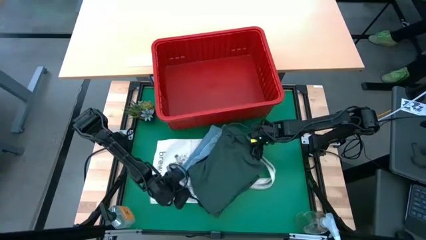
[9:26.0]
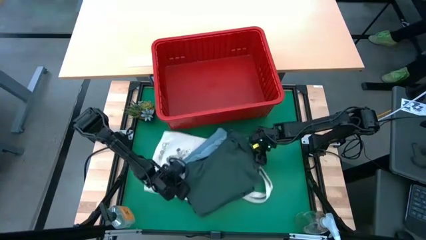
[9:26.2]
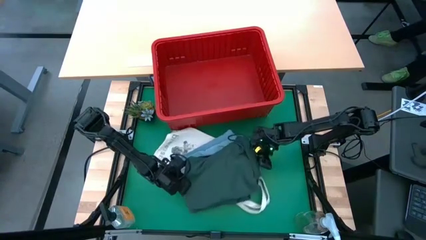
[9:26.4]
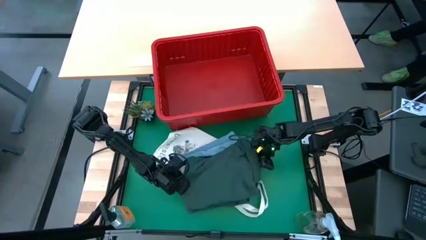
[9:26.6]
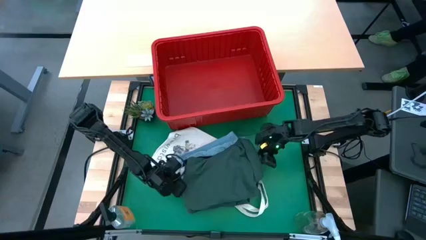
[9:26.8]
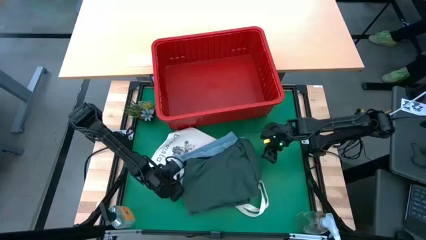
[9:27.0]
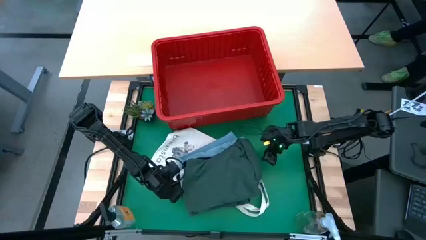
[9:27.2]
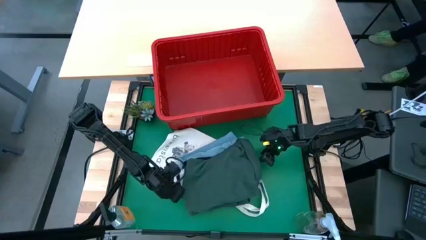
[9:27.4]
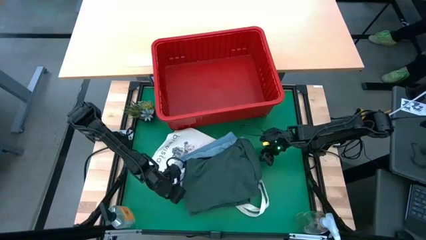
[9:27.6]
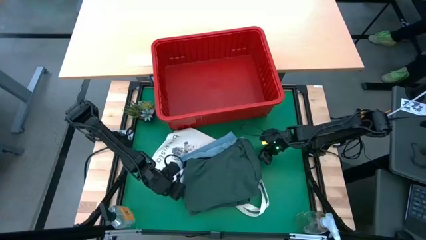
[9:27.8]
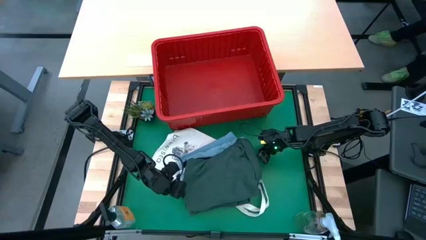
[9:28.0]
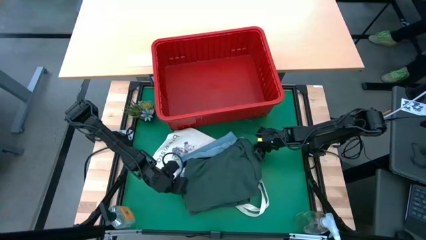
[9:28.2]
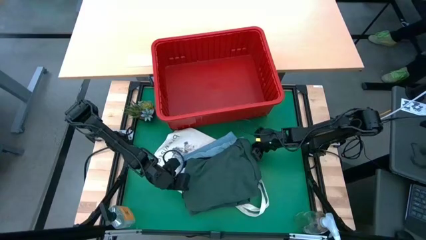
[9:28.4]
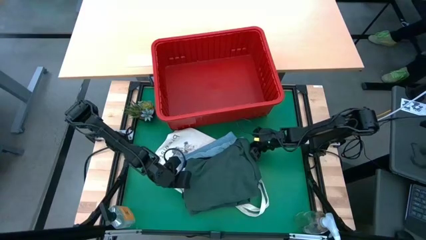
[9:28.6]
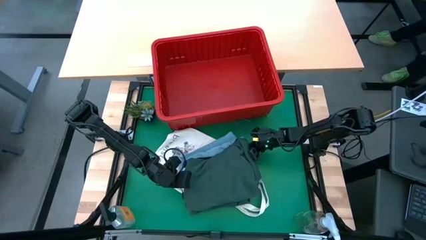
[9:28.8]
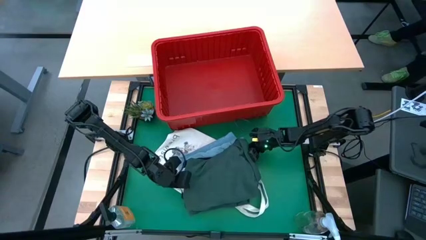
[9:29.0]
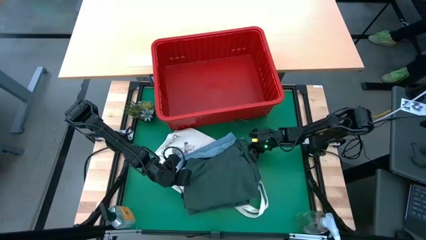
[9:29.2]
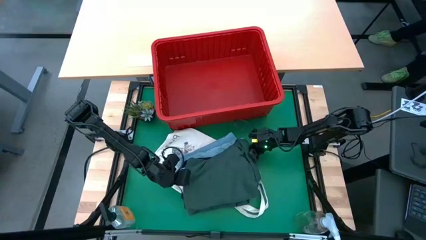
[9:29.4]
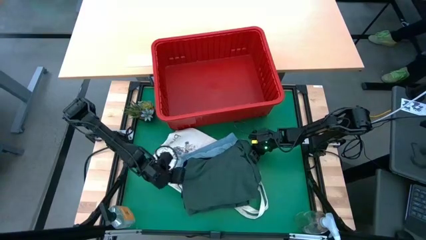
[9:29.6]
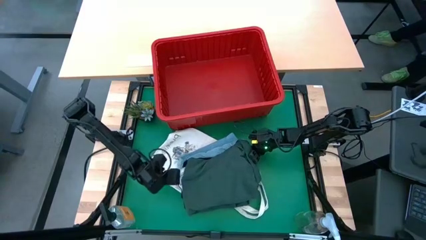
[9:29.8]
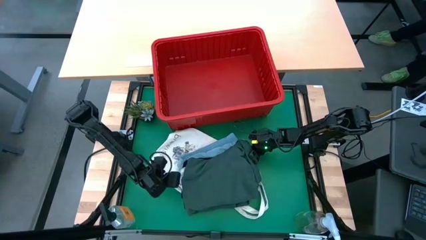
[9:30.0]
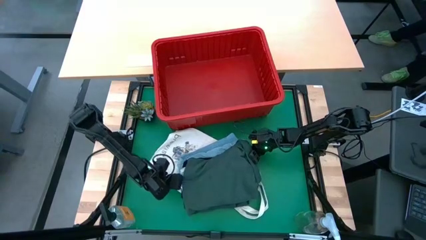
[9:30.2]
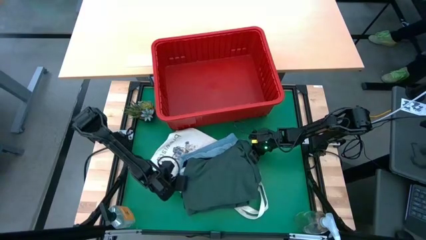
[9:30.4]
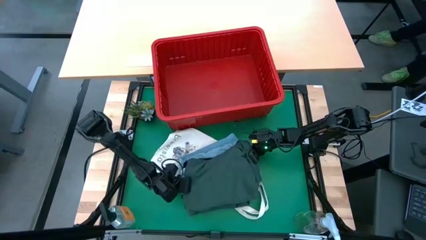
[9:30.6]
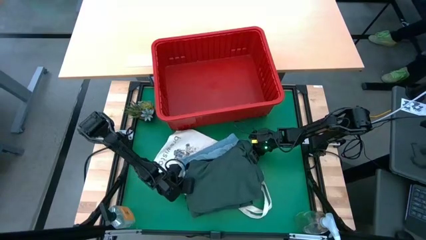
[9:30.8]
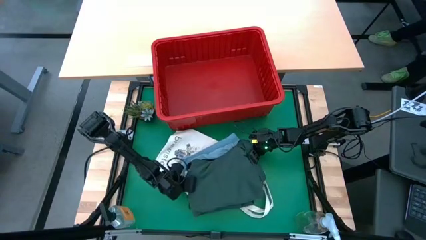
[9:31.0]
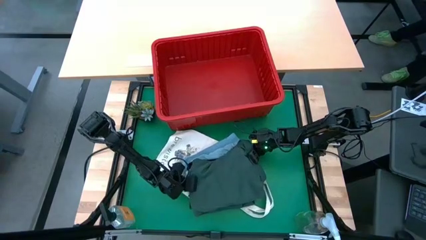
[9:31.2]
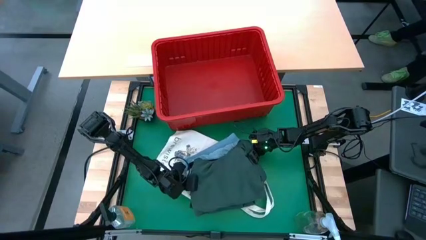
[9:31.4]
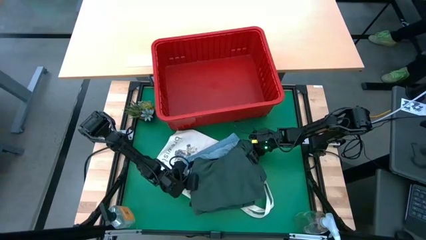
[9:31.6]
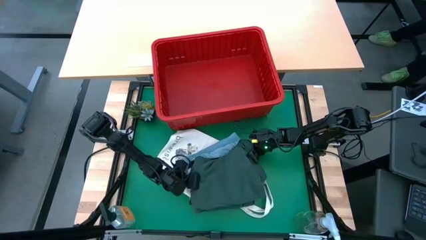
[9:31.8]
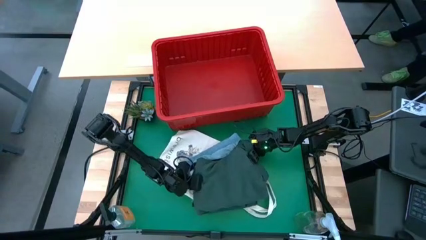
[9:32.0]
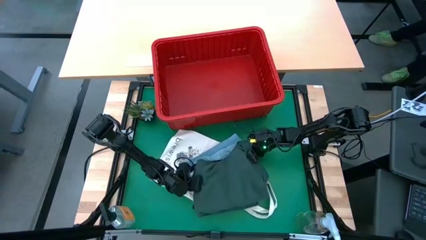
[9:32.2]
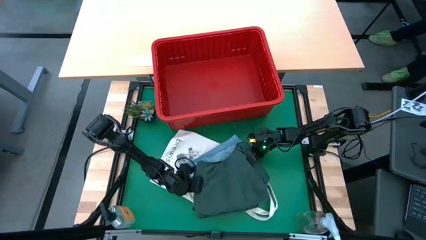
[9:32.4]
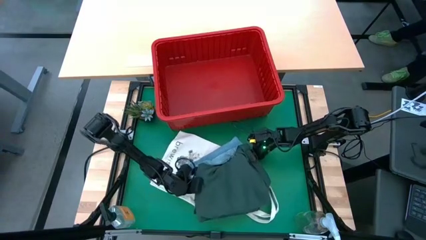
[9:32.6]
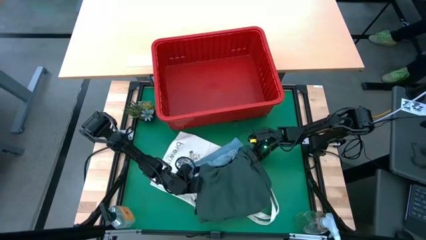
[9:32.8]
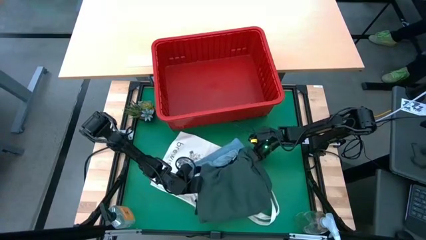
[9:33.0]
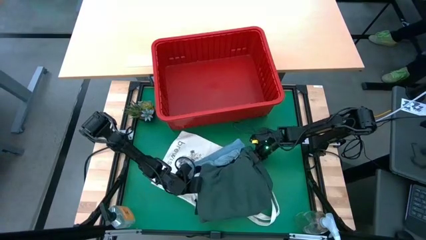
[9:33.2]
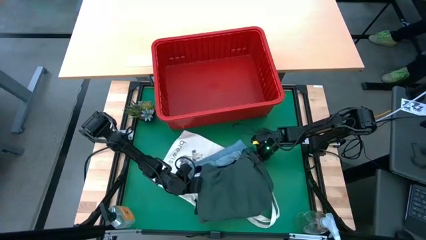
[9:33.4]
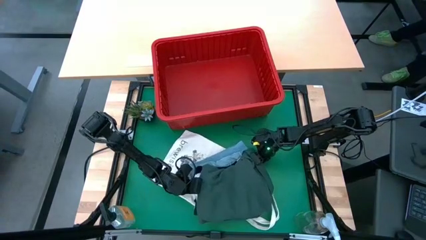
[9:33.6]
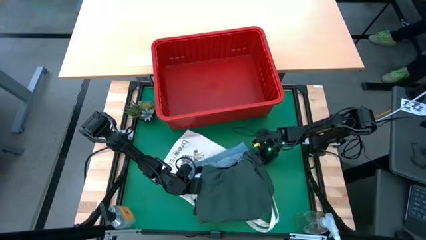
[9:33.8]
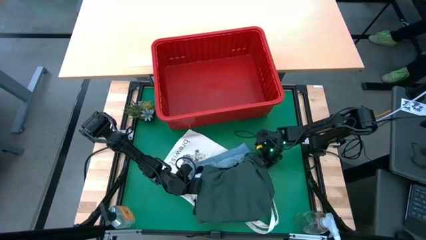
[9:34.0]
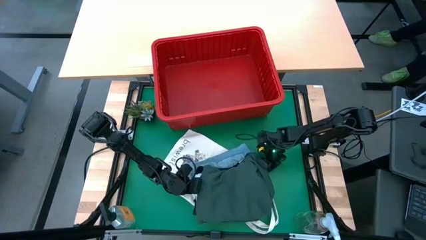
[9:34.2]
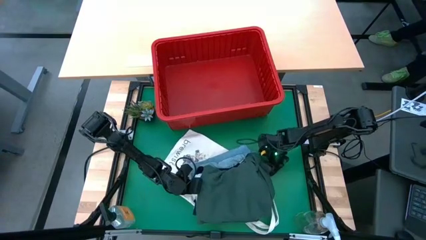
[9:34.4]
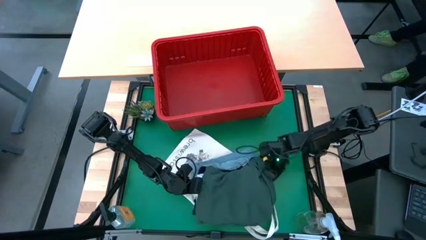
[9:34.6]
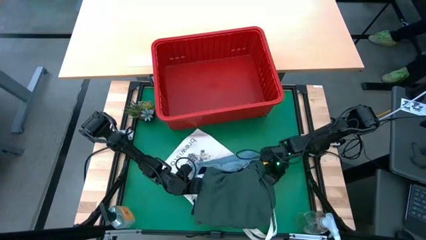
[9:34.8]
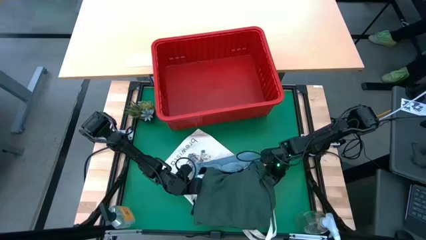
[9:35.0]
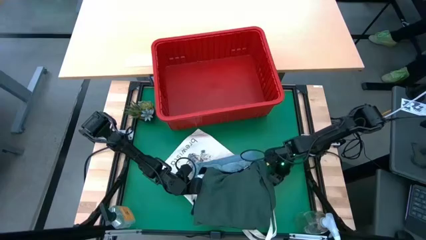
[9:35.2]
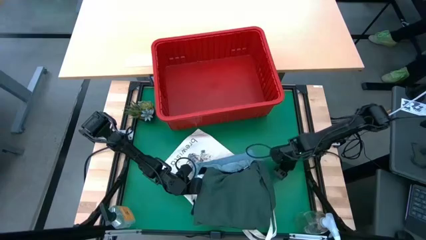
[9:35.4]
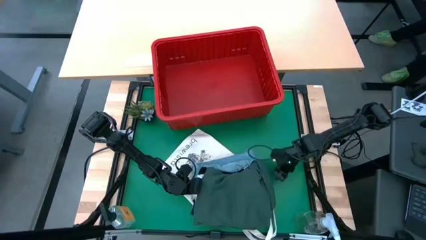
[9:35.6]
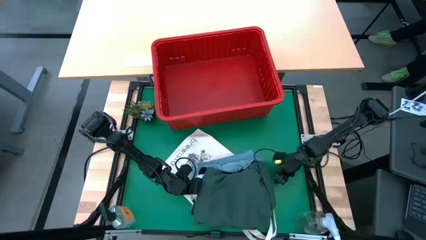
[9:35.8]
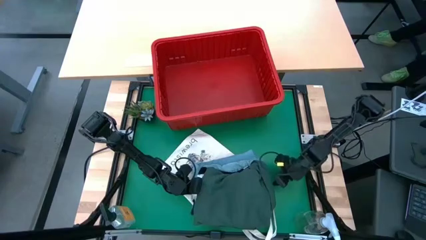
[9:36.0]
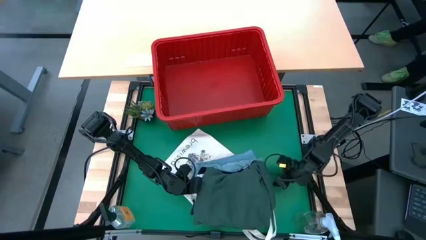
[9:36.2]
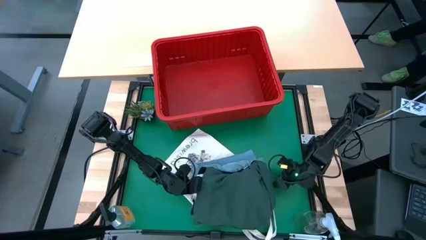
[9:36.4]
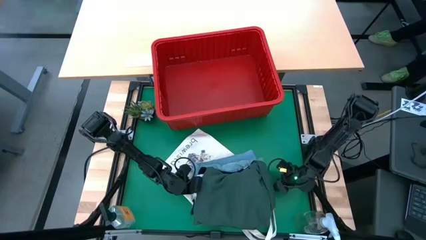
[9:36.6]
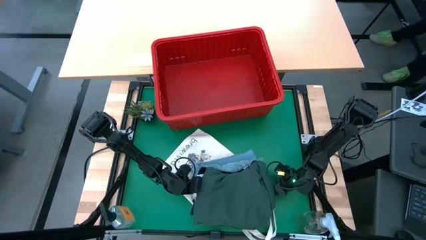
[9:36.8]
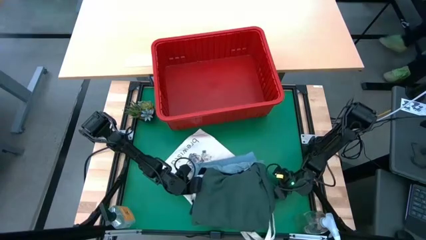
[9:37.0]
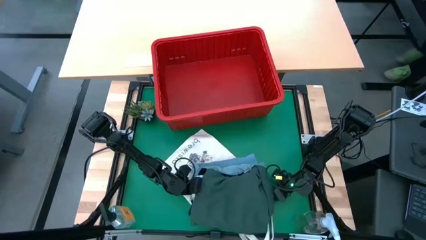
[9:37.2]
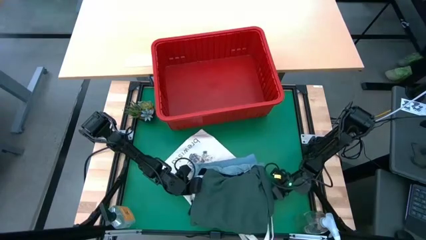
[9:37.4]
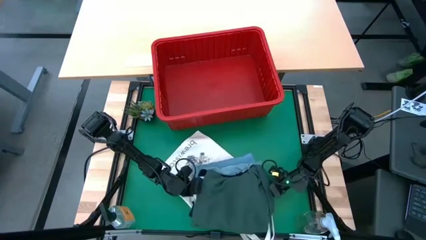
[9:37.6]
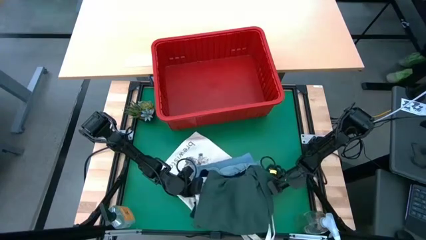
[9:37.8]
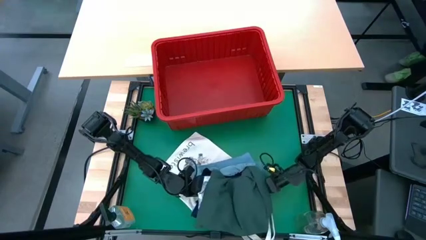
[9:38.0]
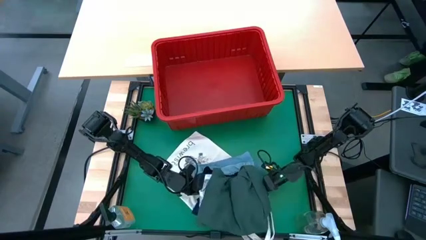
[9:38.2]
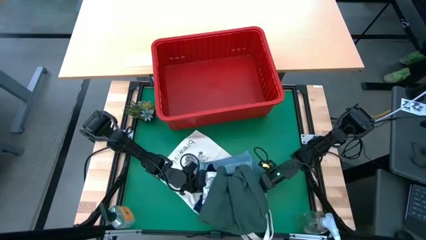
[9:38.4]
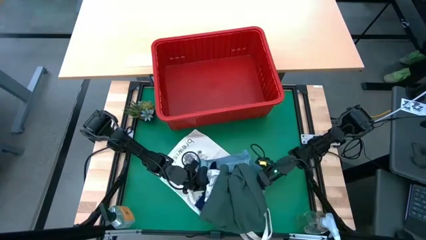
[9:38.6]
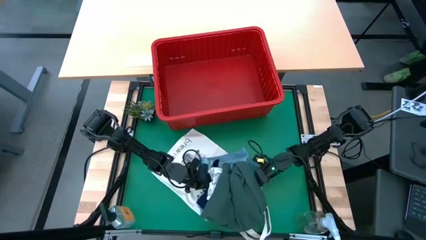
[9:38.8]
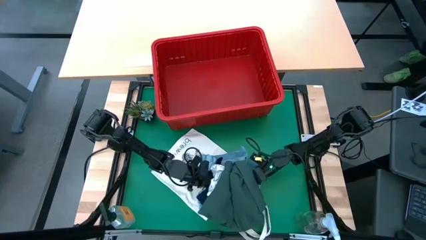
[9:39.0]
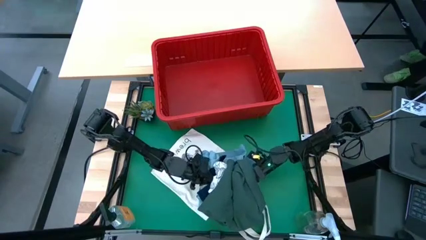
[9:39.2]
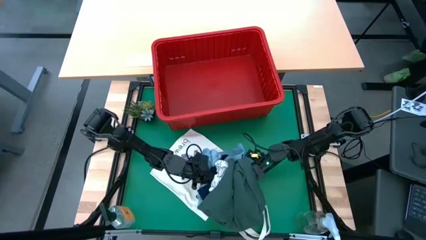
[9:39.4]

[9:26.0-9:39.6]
Task: Fold laundry
Put the clothes into the red bin
